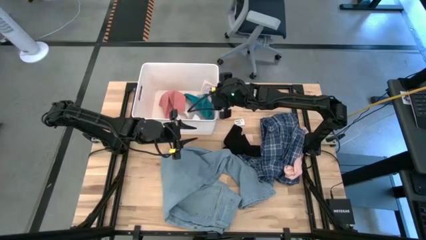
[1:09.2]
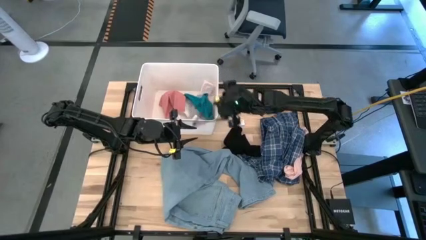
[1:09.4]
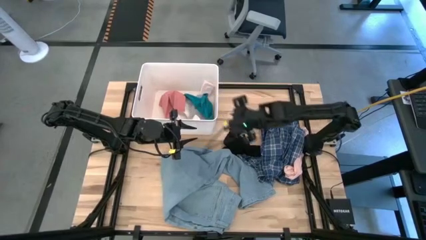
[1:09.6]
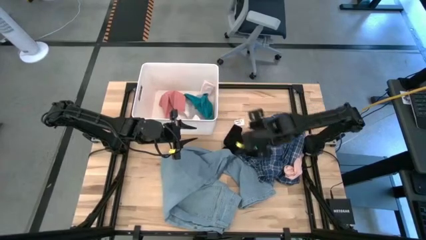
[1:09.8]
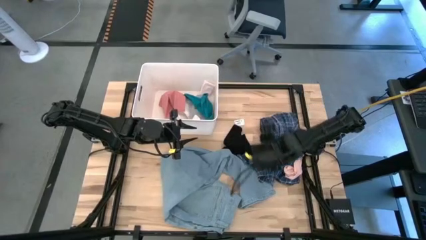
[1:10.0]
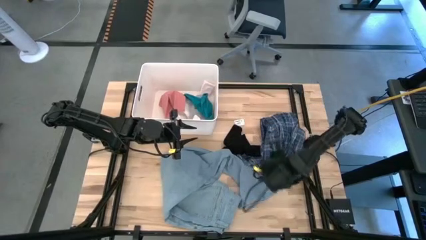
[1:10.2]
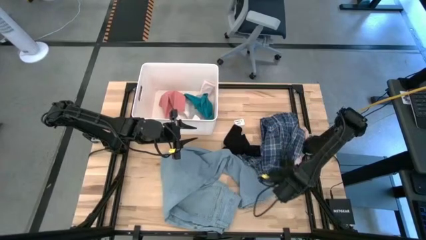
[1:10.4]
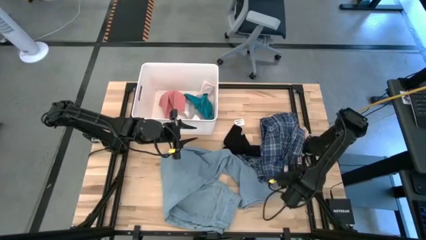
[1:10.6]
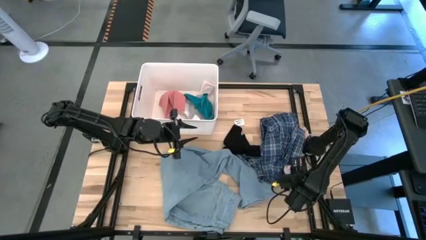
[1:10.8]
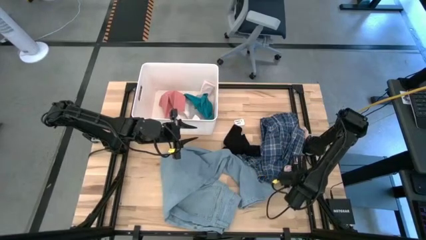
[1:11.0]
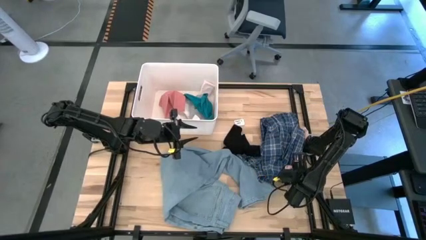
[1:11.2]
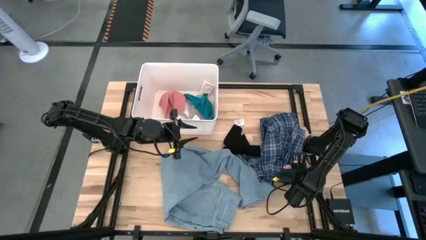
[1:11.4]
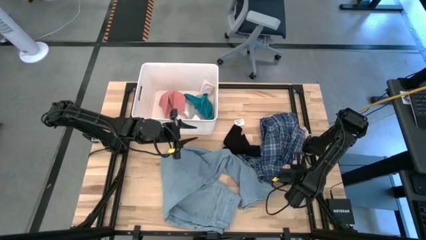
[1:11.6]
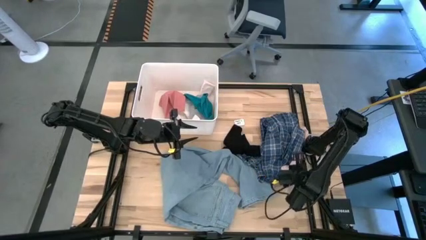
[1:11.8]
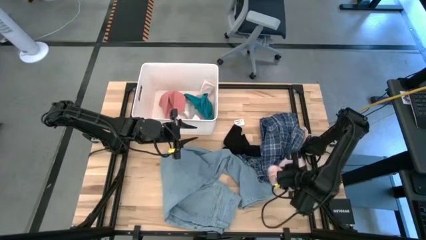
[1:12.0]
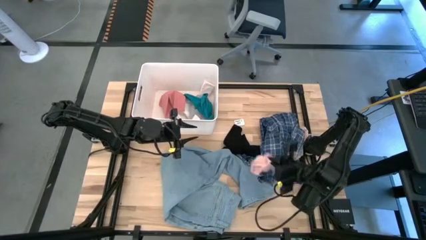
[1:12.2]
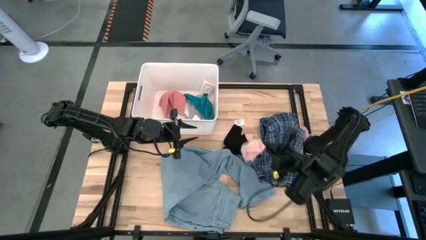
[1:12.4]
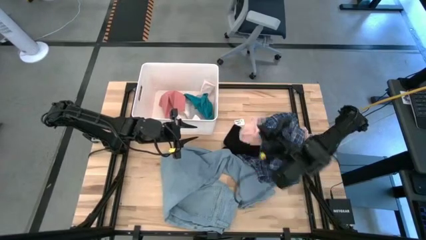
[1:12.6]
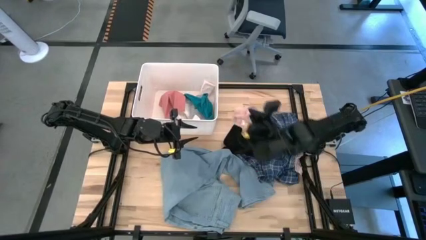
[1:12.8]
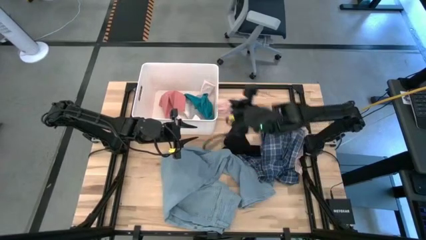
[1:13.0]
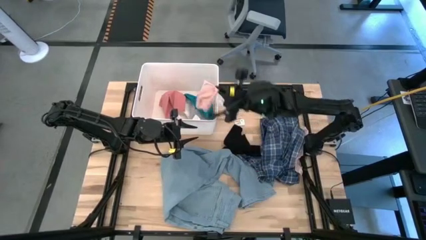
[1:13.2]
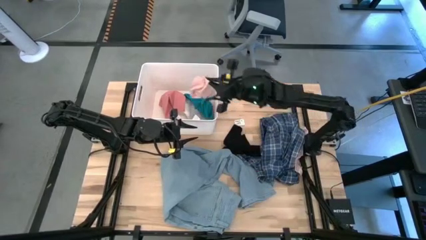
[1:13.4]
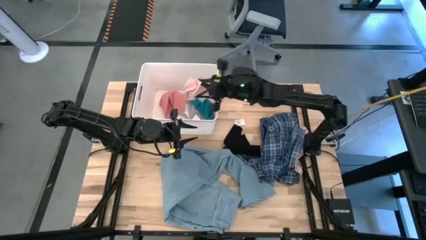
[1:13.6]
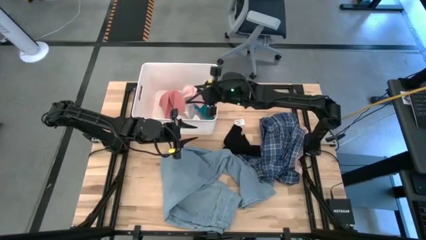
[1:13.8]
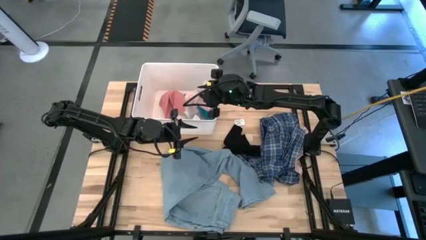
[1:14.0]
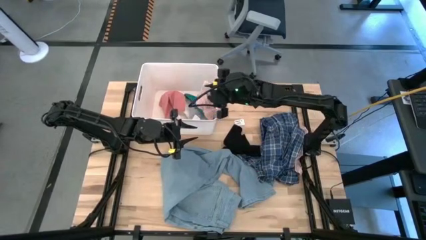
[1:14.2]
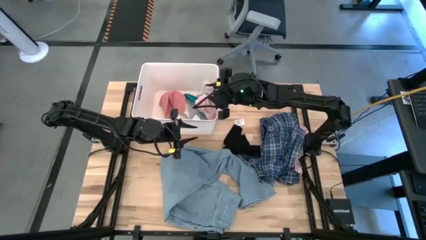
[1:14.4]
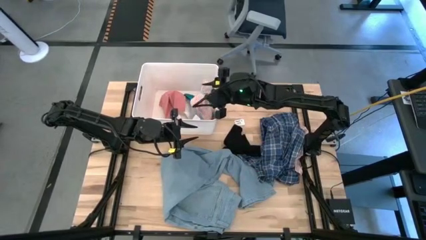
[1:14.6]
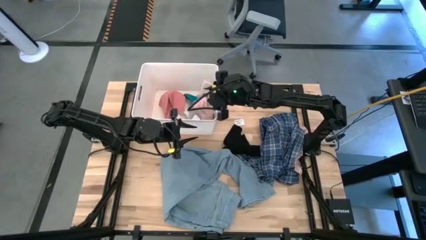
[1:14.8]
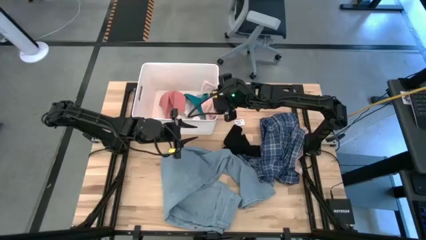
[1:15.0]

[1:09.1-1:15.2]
Task: Sort clothes
Put the top pink sock into the white bin

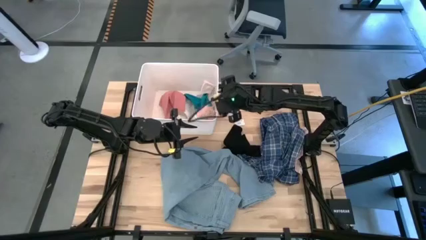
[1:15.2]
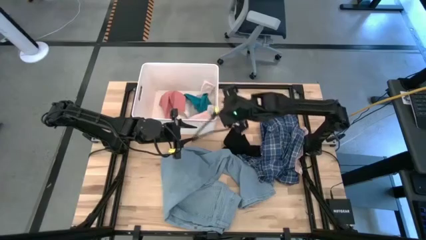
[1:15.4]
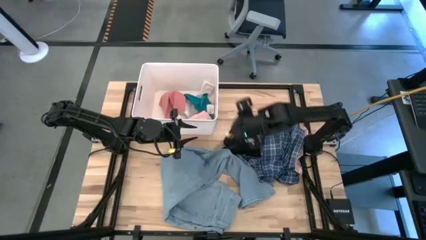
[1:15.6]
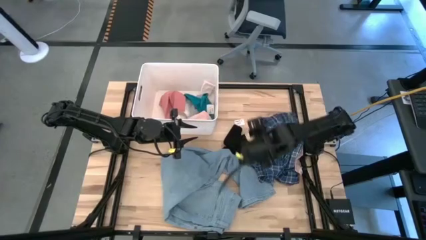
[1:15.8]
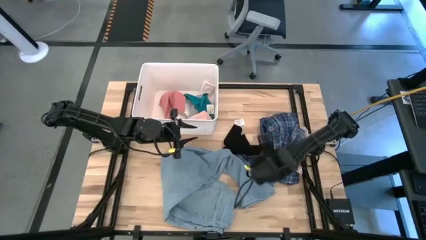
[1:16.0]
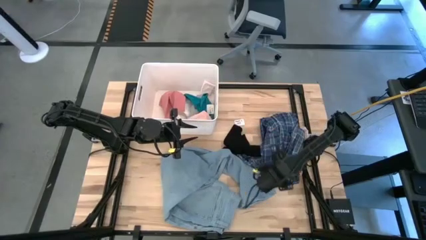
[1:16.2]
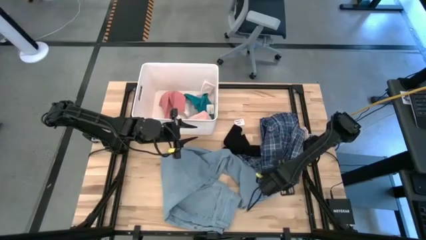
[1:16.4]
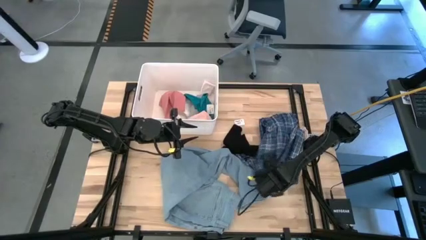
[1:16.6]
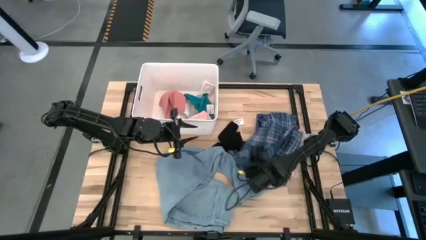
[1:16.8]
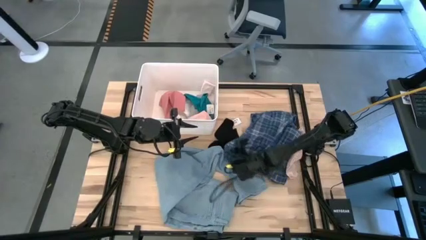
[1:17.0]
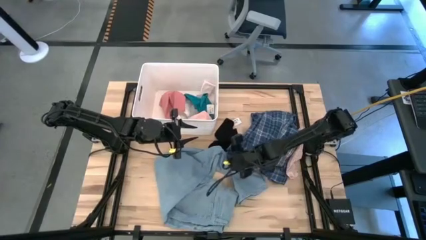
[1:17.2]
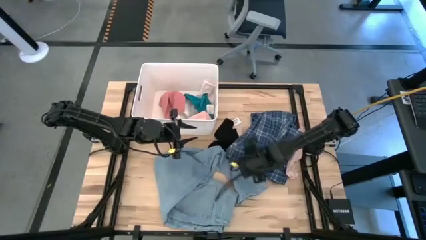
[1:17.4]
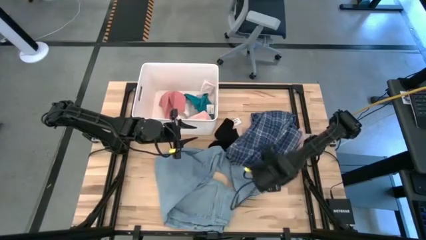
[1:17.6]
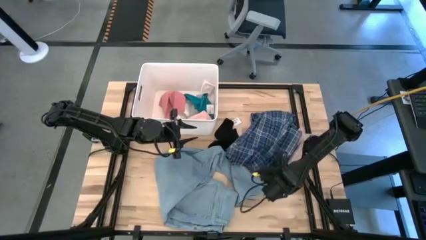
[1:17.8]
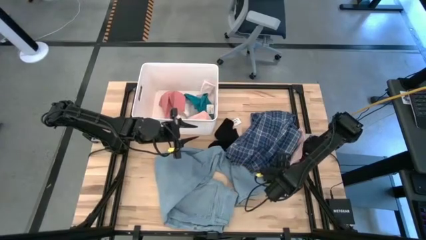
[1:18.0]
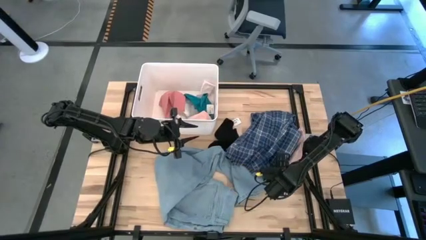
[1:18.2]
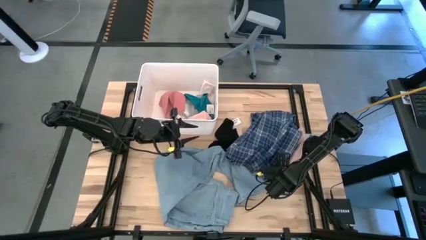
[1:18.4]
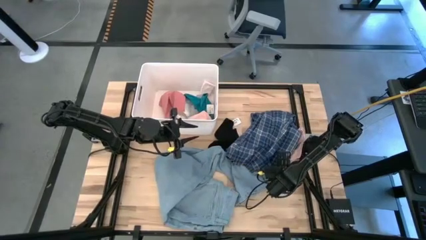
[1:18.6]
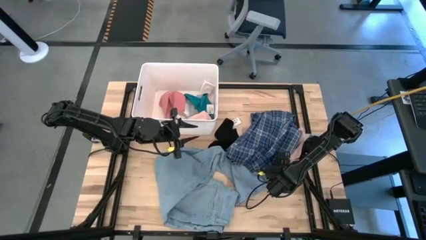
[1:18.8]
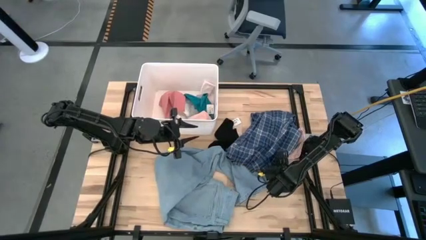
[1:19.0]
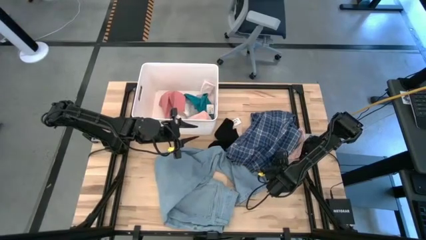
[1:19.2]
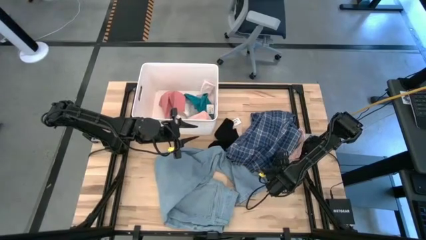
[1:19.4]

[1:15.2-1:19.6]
Put the pink sock into the white bin

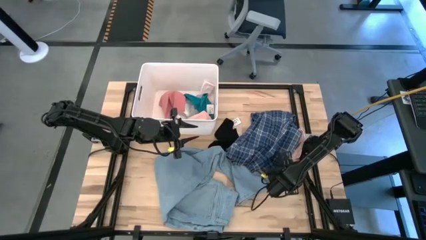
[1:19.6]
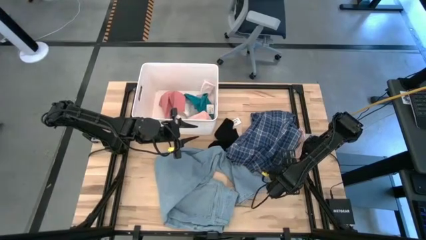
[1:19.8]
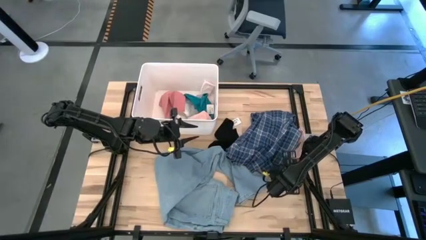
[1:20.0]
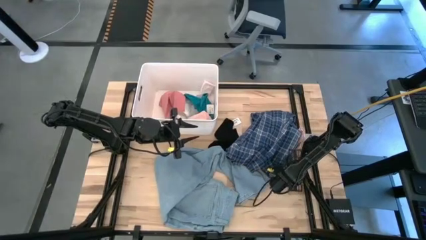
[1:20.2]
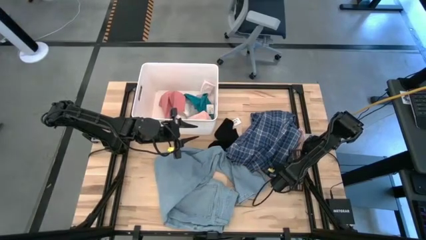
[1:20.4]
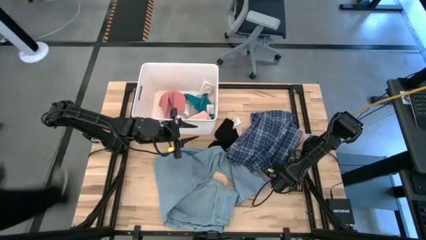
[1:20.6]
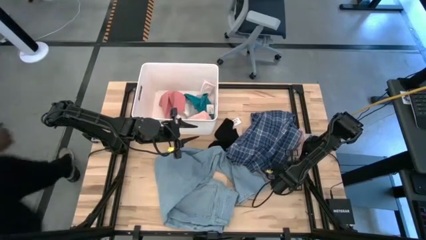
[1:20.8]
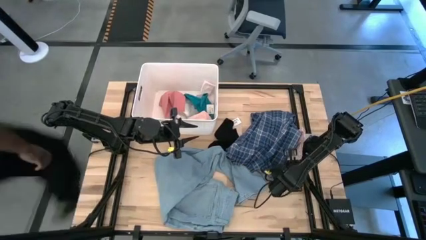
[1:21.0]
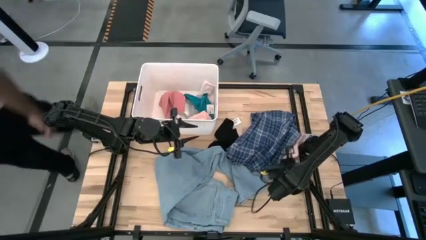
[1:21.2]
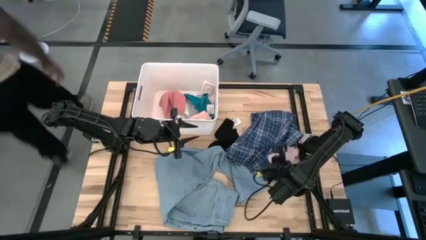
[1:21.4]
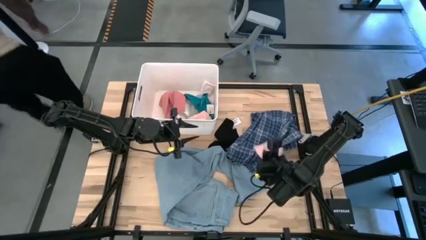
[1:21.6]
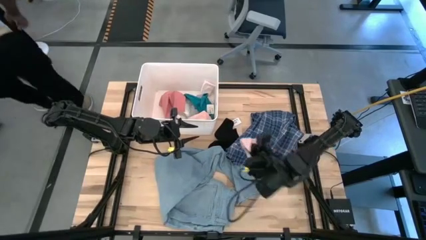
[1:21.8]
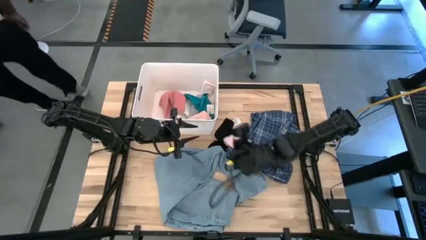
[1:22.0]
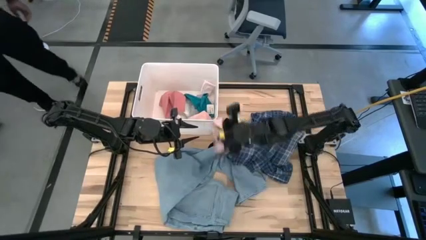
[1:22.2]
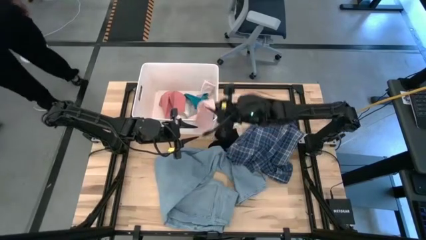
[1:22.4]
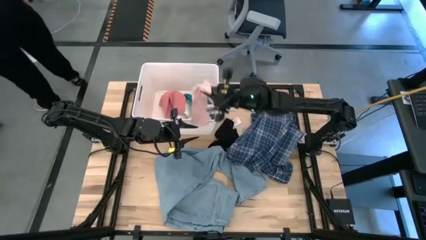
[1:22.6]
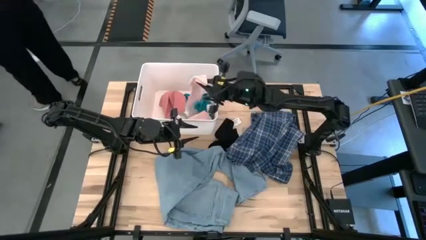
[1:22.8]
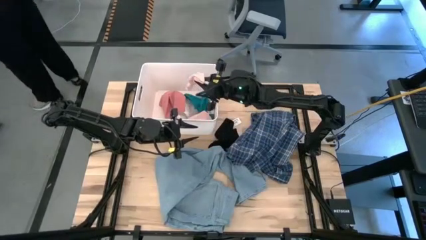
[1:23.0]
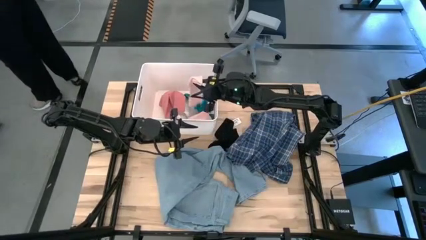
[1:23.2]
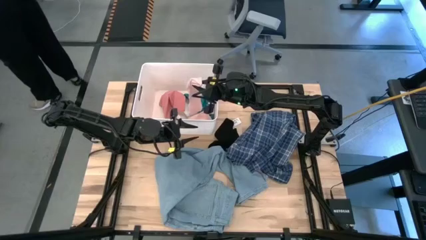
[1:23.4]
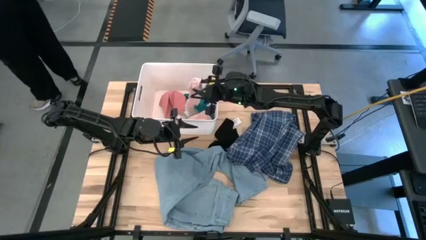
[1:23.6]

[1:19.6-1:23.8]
Put the pink sock into the white bin

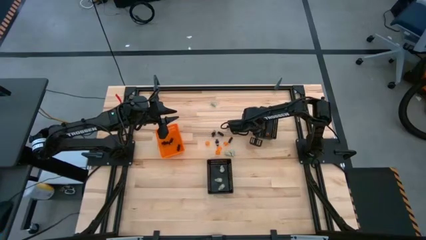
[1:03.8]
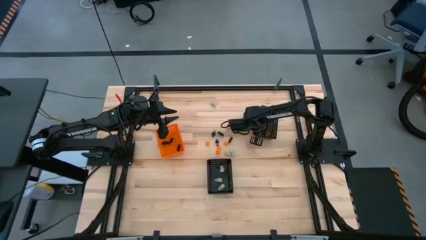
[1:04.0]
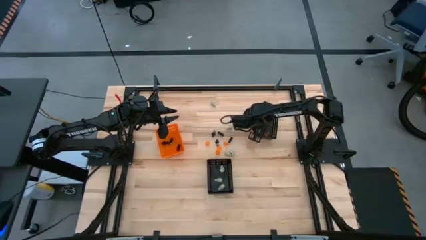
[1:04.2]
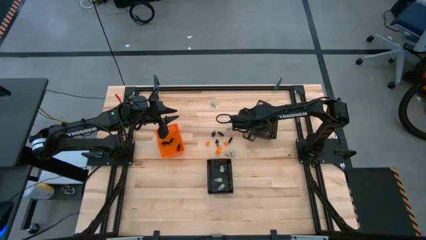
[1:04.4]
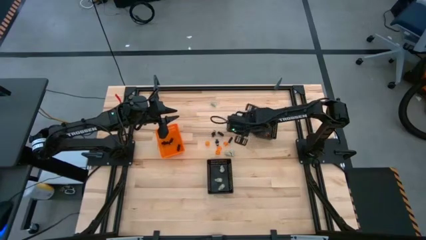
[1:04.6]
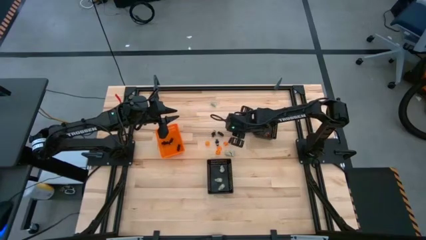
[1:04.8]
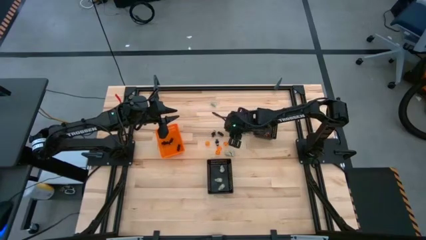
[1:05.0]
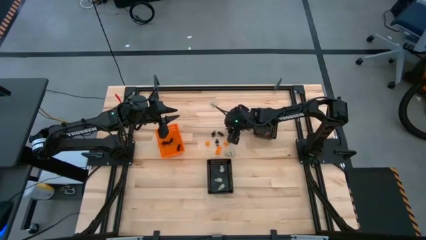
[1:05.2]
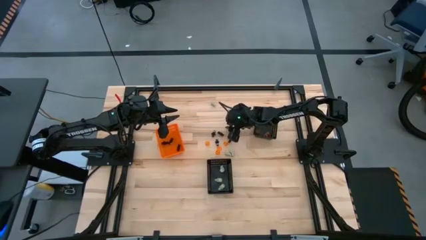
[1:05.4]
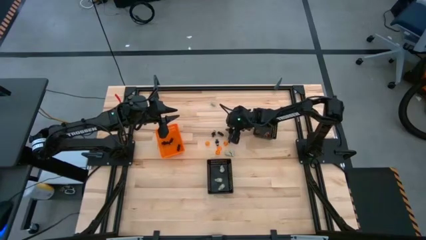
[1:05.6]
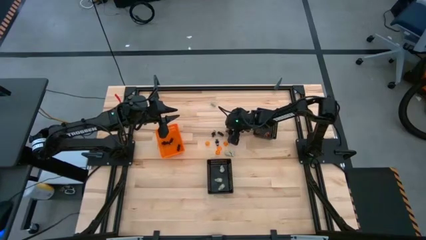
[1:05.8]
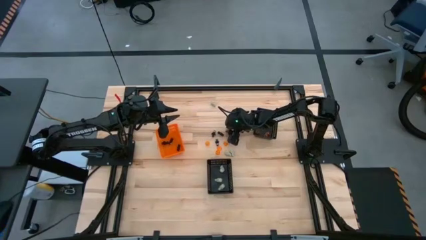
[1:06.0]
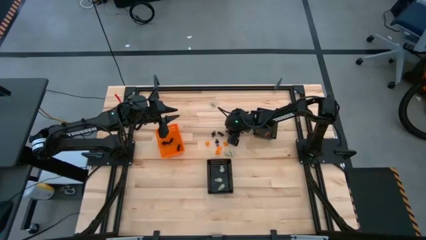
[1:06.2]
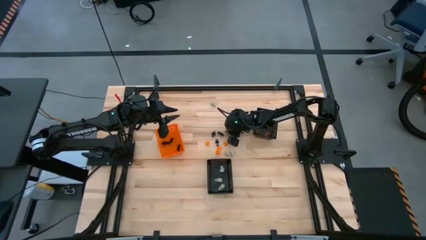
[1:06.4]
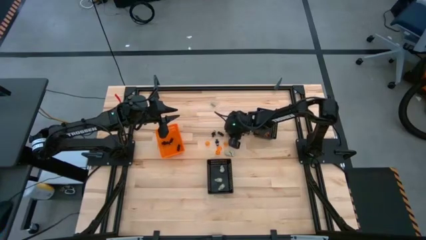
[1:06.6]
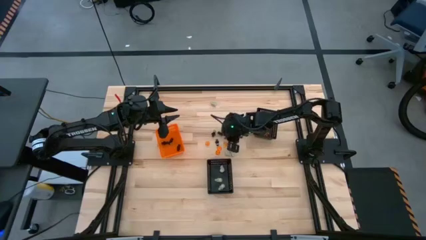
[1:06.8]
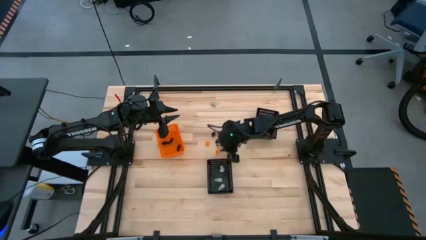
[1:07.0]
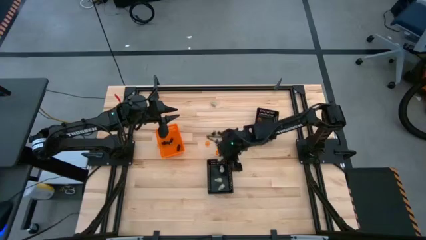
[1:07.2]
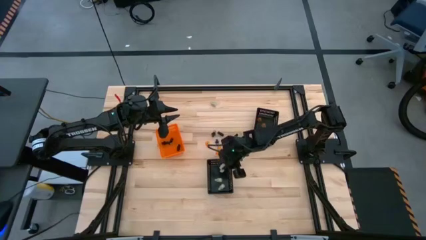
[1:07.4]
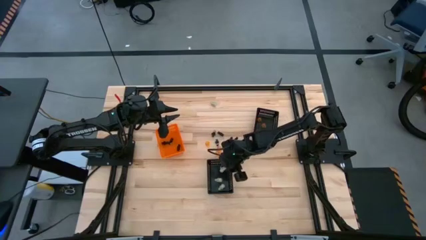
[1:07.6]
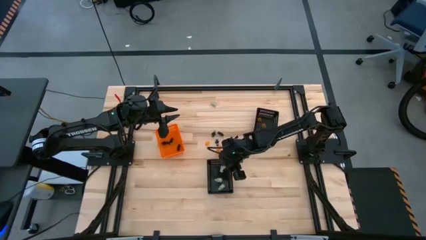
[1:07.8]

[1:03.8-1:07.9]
Task: Sort Halloween decoration
Put the white skull toy into the bottom black bin
